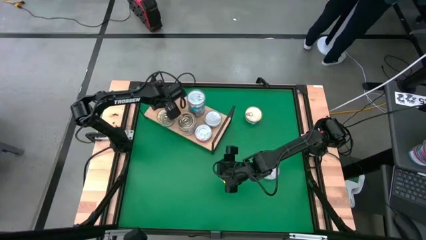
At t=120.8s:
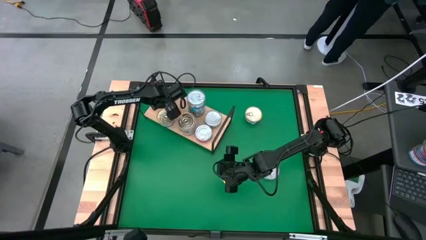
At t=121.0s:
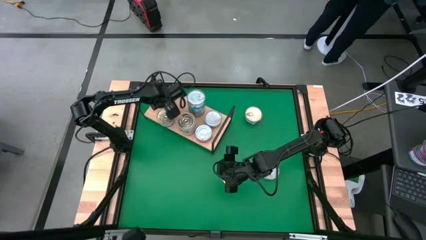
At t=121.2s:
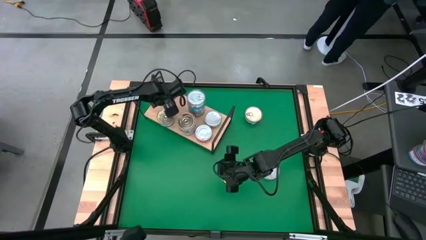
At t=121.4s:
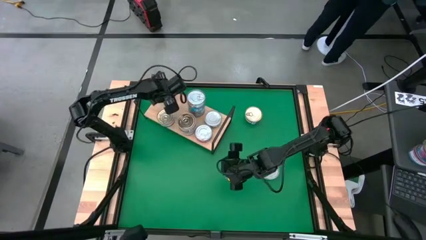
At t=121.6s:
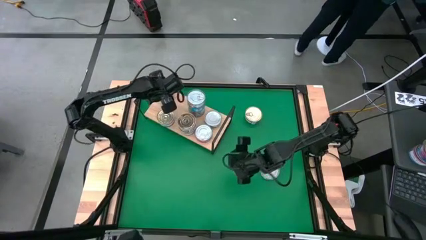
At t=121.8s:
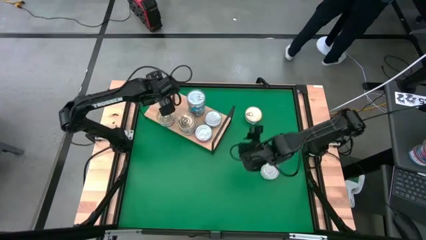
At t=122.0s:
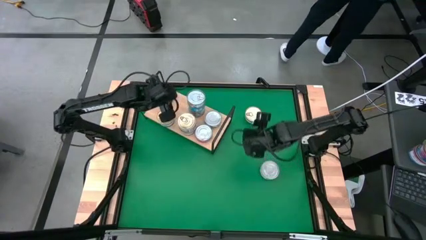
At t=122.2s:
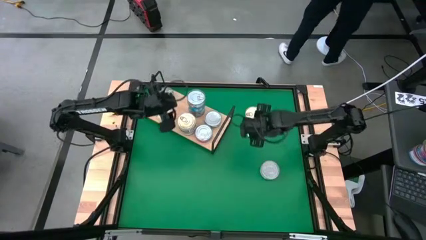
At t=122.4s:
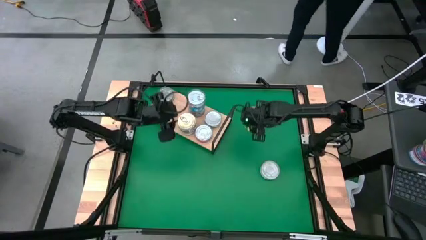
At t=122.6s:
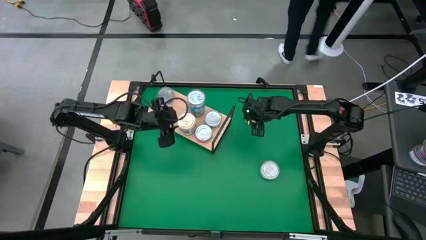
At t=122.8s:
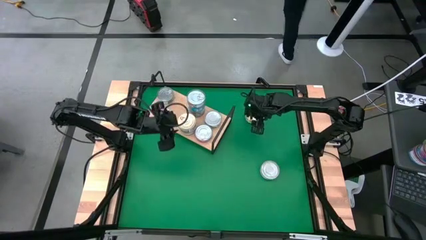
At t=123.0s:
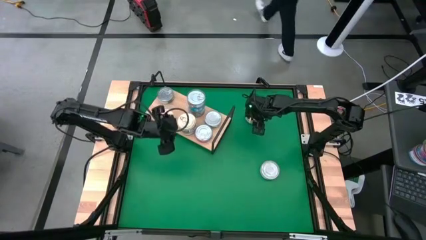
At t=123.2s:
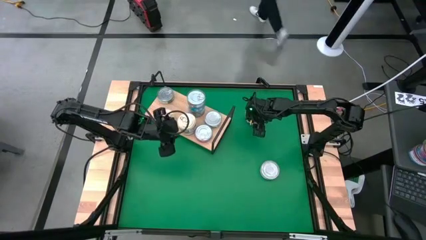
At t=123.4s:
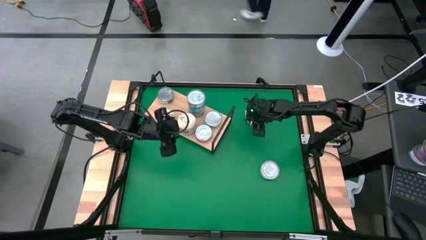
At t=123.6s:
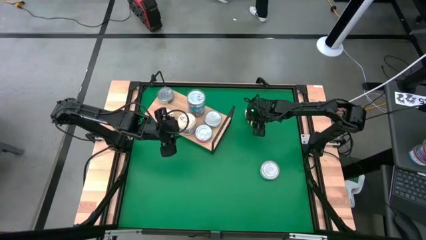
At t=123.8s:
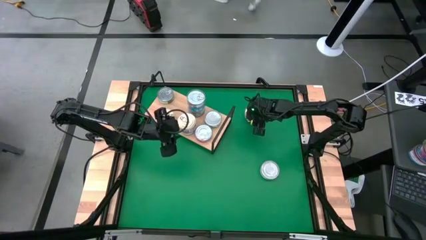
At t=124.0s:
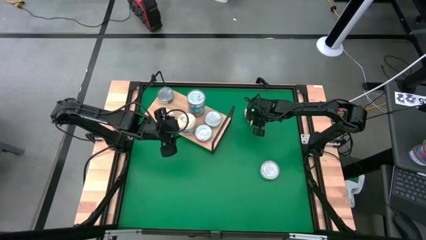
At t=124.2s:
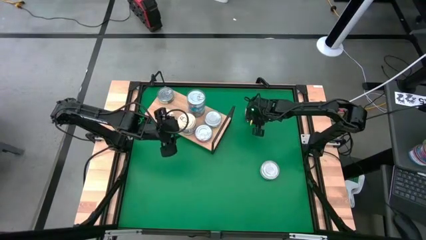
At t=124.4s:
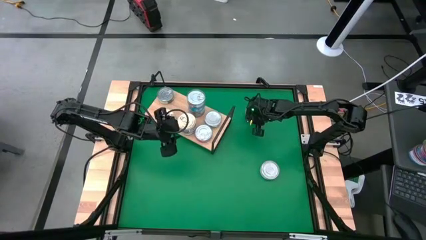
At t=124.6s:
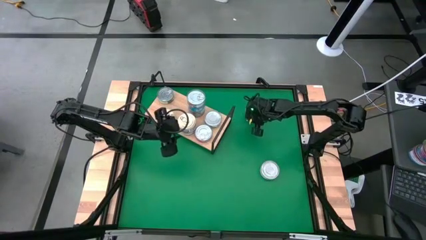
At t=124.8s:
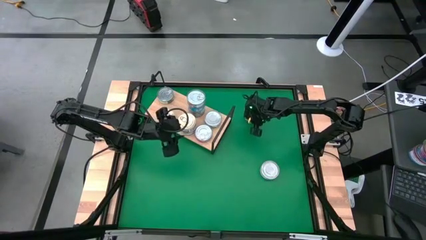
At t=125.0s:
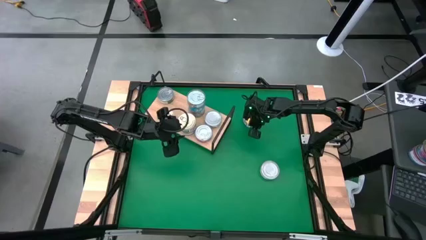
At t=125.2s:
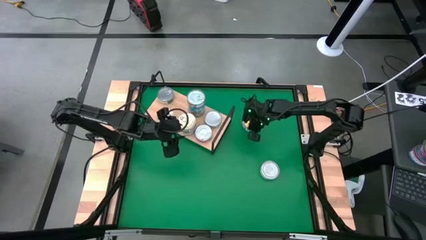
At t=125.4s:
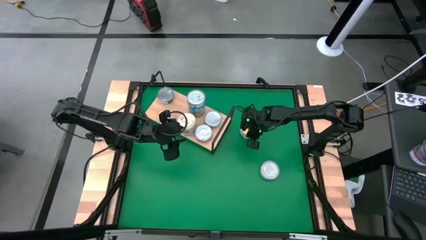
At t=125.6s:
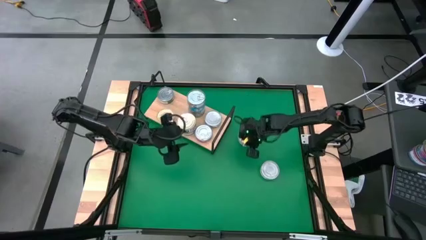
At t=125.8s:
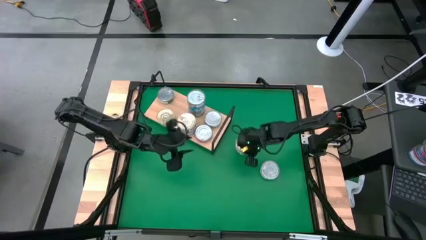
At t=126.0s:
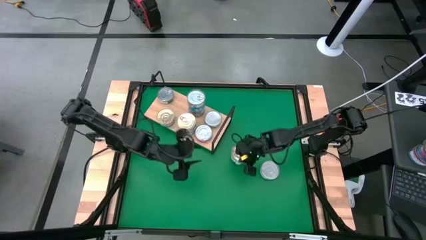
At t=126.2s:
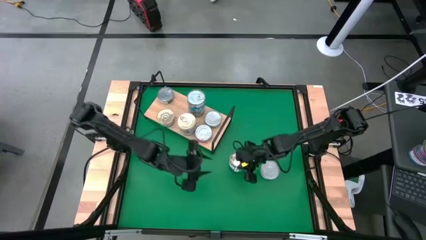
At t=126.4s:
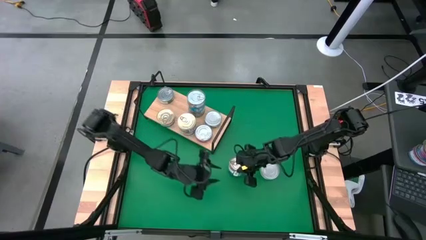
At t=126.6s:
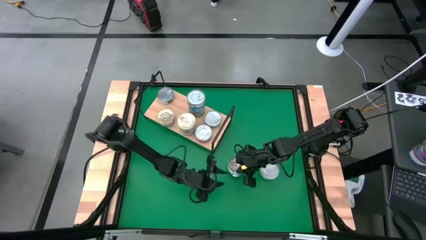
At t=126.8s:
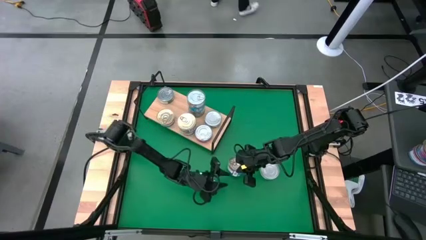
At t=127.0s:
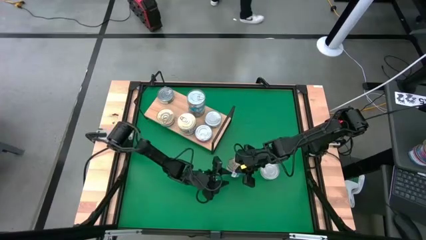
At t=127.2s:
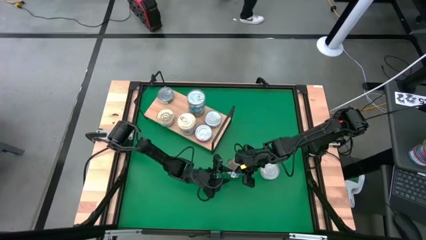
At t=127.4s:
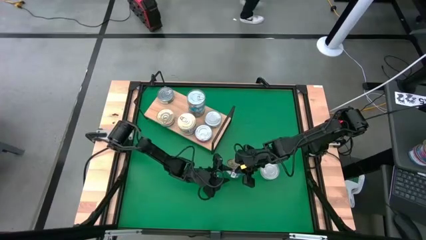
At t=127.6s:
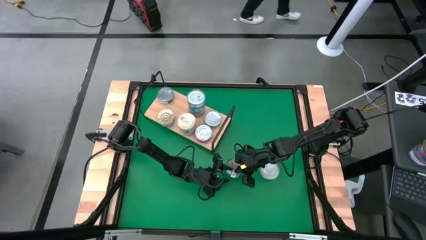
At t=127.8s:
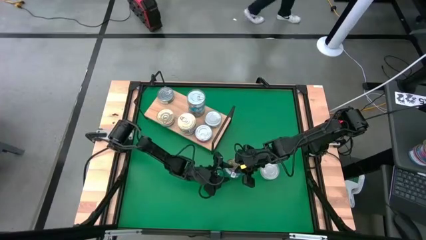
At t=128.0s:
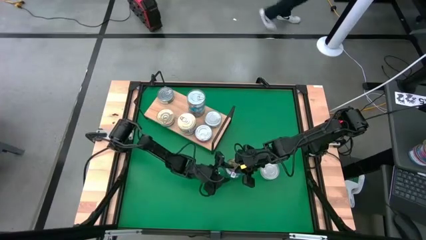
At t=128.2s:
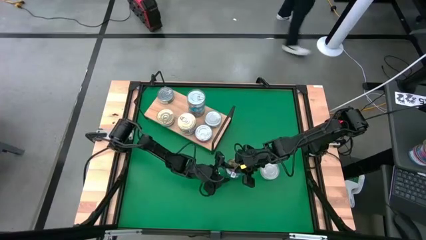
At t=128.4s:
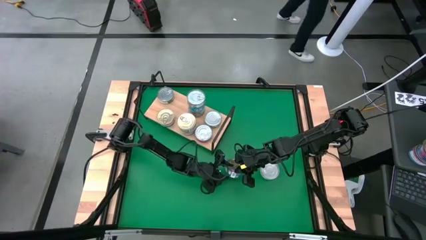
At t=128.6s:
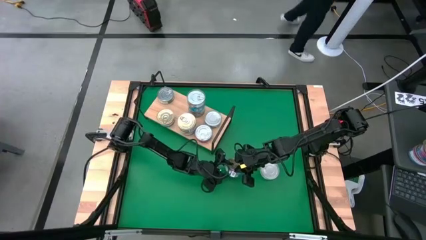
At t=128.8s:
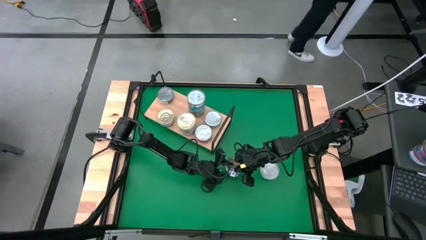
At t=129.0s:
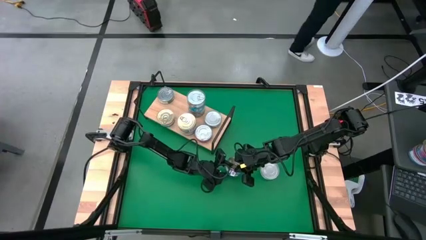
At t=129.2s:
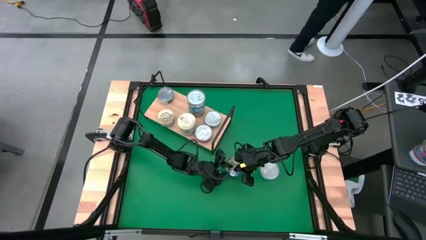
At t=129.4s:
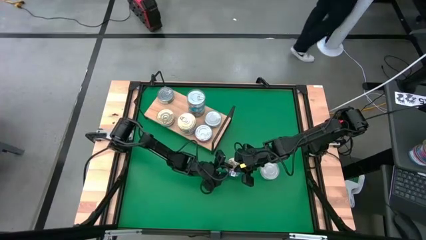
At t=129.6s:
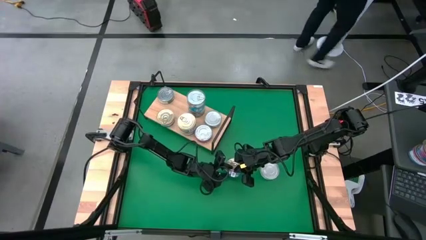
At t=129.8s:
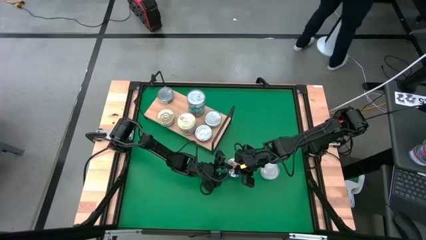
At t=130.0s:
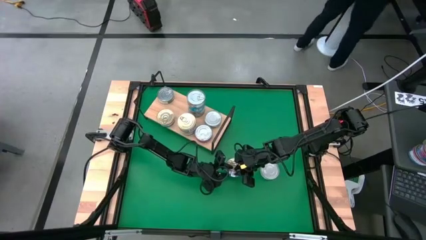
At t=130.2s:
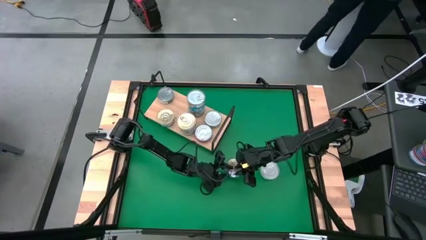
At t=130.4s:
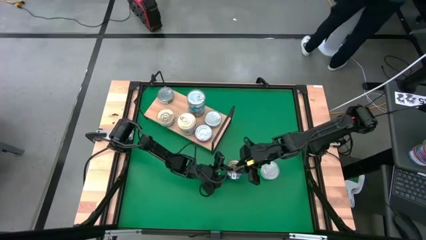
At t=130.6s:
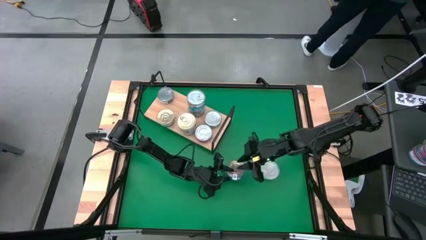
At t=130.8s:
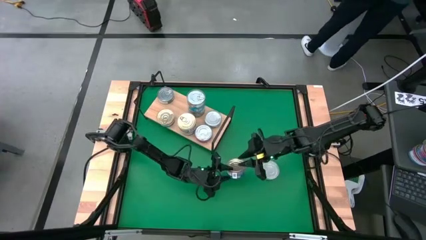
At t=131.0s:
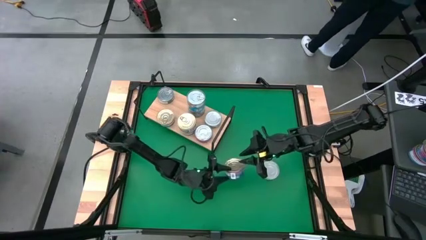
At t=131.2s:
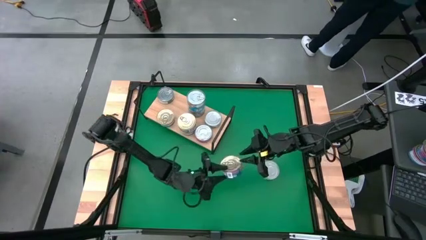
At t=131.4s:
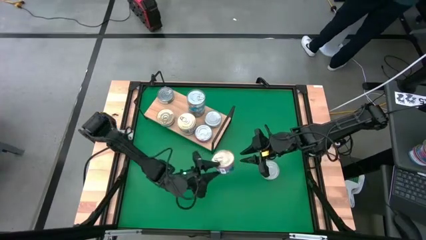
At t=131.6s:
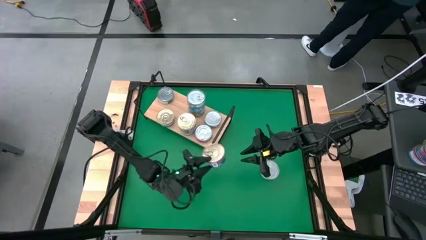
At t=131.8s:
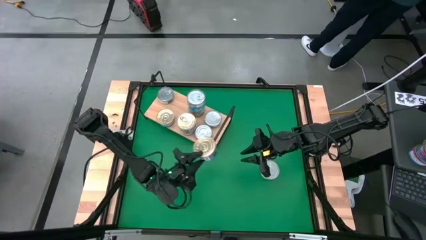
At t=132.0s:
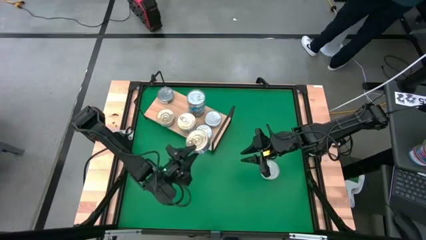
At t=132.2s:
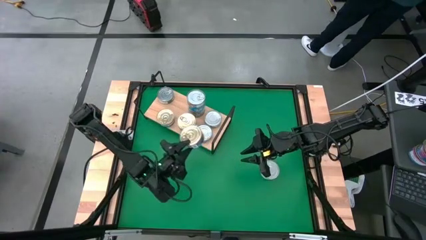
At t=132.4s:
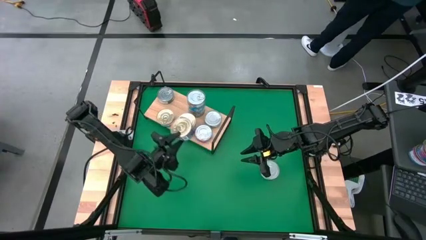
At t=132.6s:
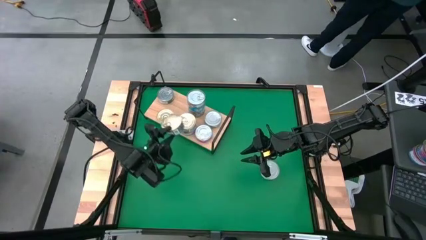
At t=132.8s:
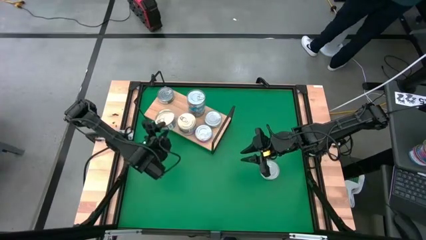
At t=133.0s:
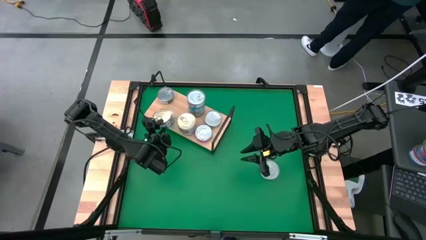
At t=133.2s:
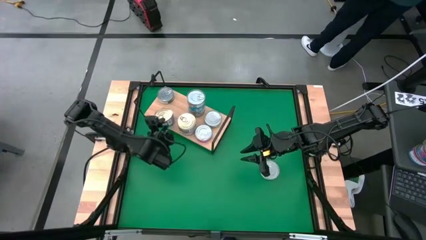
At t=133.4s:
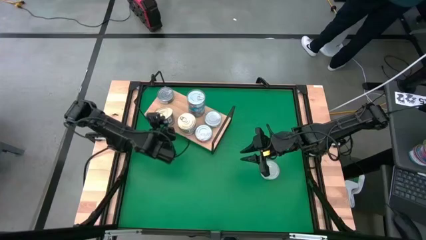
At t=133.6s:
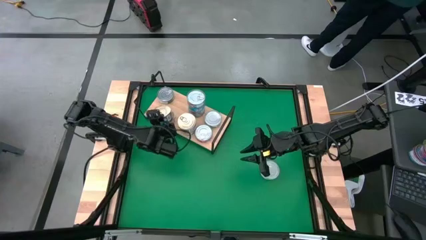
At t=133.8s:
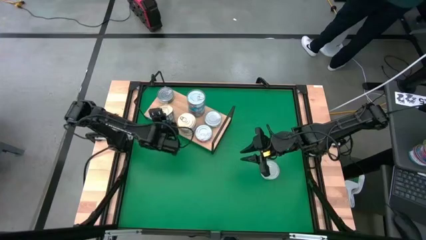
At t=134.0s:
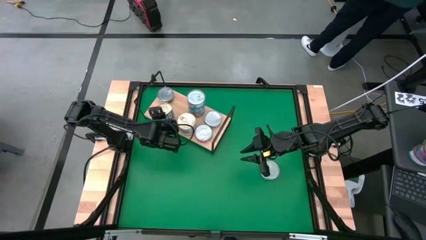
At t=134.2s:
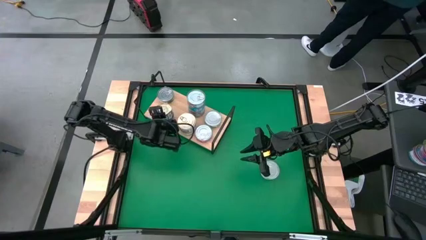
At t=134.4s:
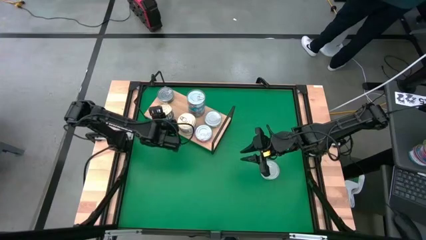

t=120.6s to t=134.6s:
Task: Stack canned seafood by type on shelf
Stack the blue tuna can on top of the blue tuna can
